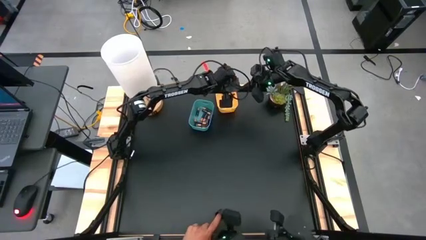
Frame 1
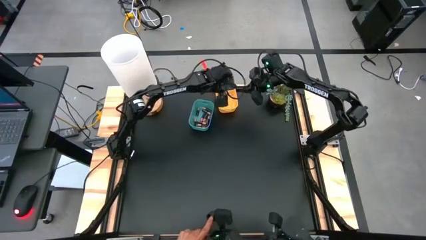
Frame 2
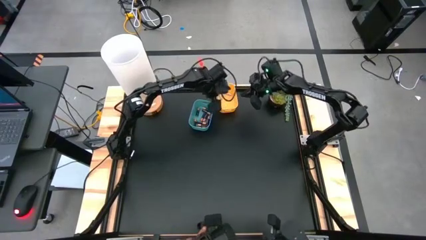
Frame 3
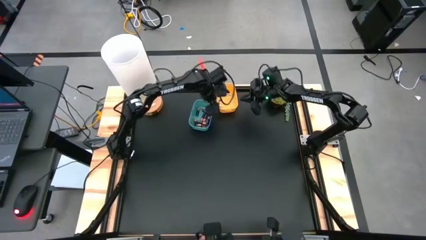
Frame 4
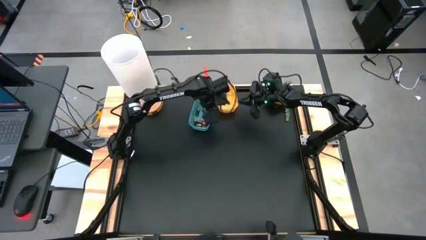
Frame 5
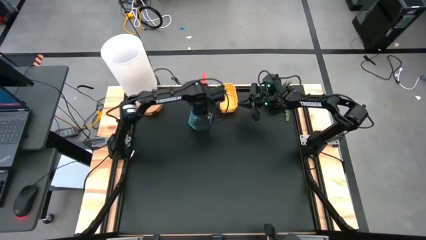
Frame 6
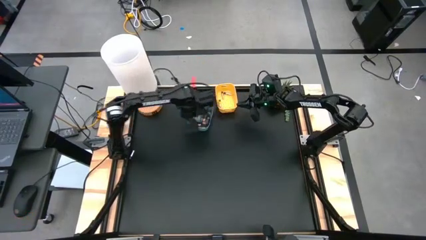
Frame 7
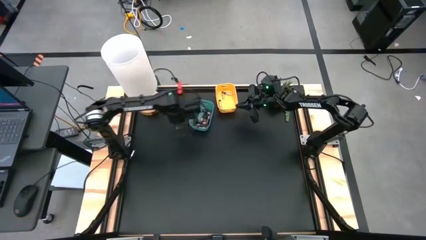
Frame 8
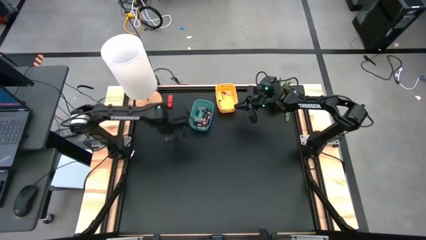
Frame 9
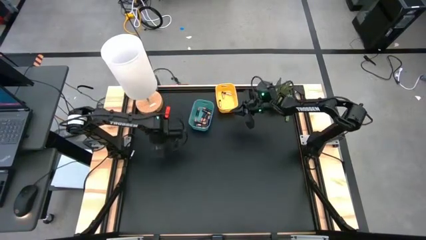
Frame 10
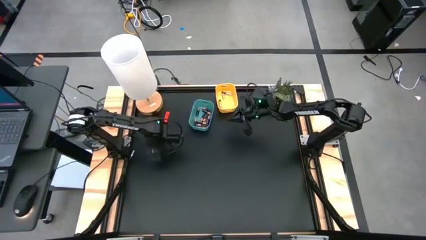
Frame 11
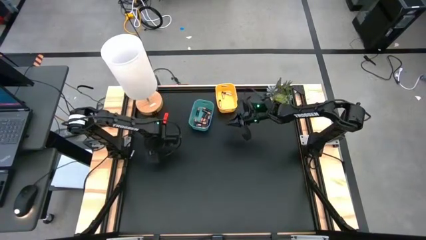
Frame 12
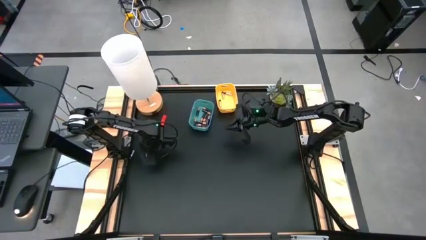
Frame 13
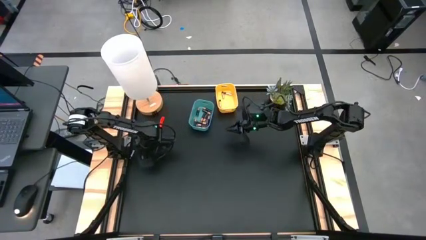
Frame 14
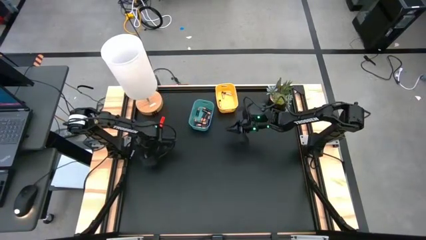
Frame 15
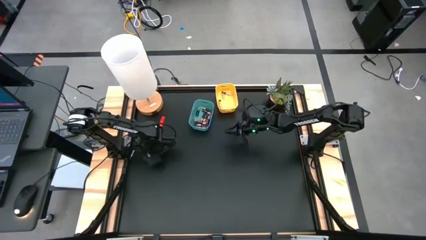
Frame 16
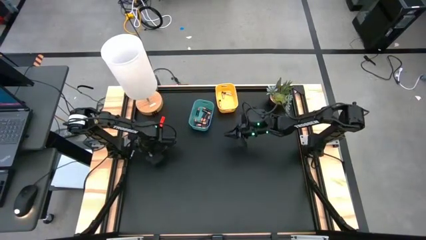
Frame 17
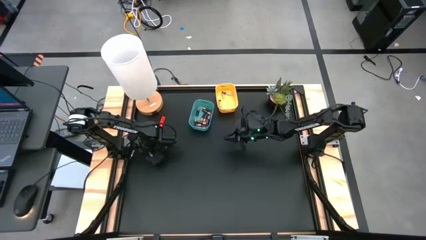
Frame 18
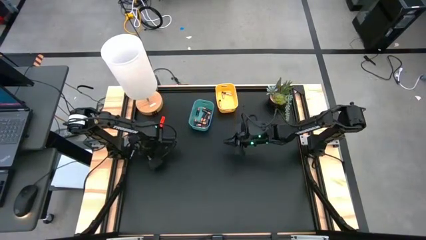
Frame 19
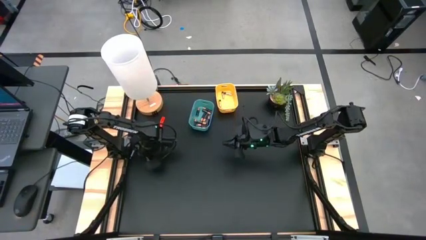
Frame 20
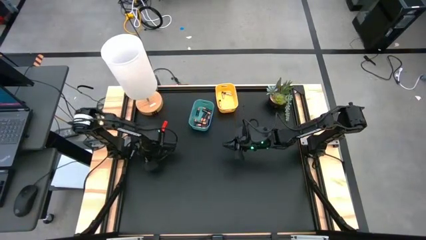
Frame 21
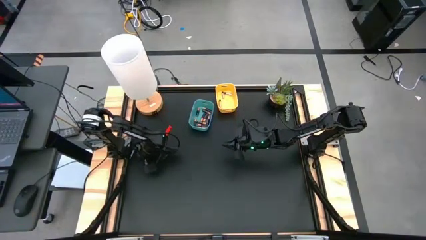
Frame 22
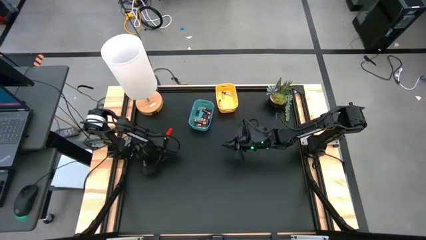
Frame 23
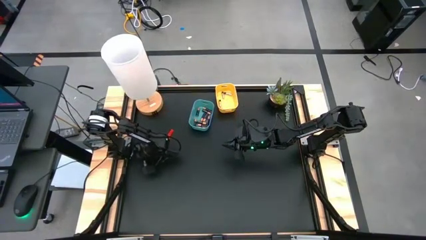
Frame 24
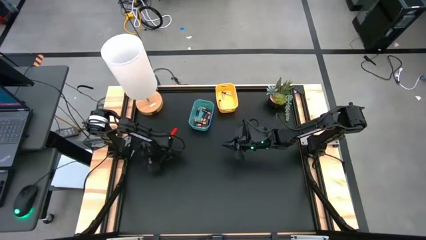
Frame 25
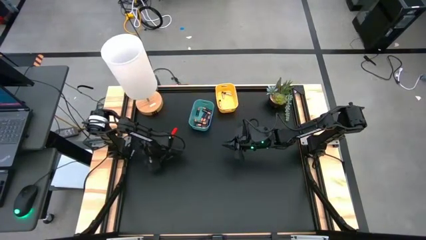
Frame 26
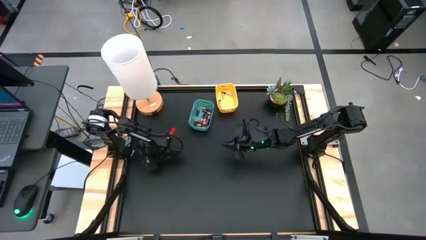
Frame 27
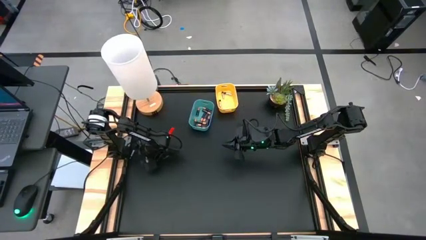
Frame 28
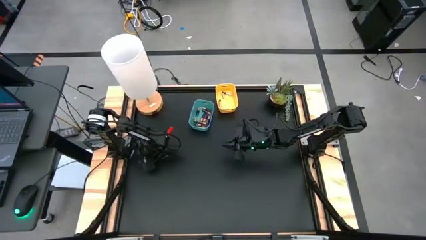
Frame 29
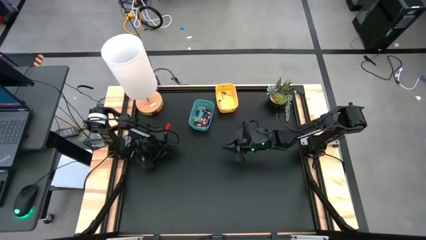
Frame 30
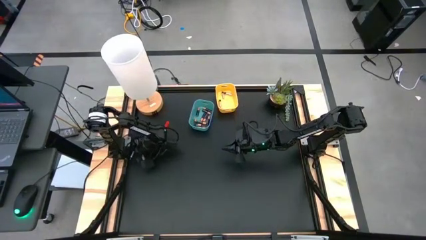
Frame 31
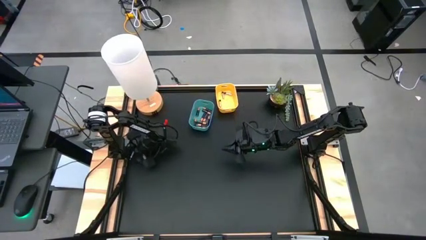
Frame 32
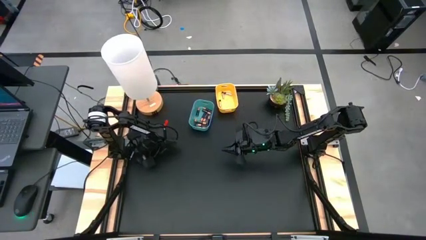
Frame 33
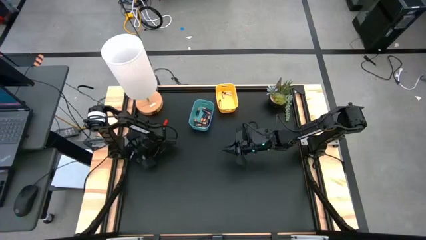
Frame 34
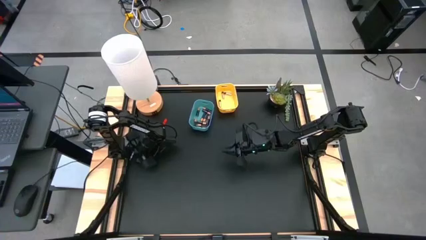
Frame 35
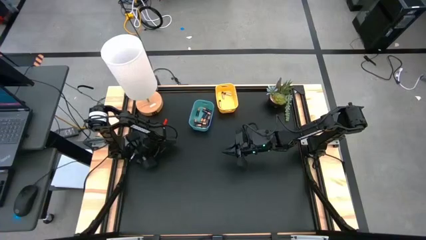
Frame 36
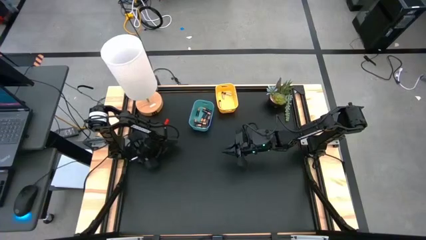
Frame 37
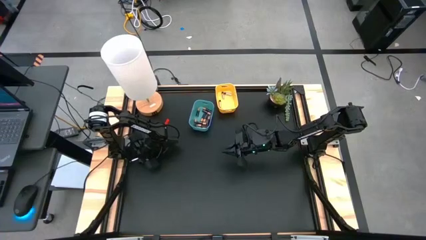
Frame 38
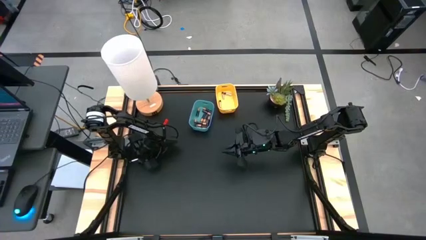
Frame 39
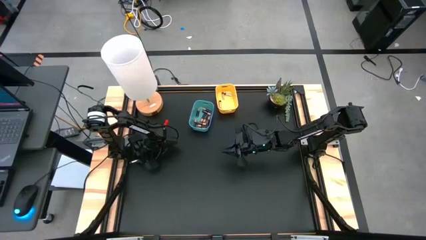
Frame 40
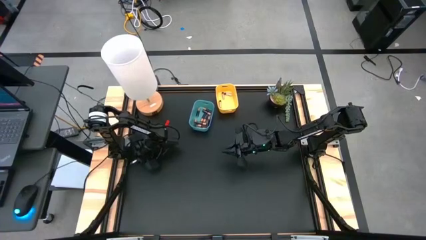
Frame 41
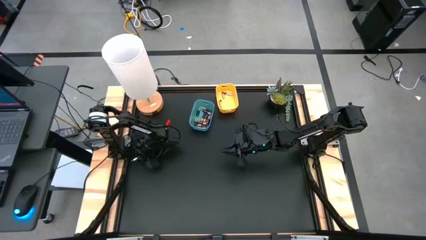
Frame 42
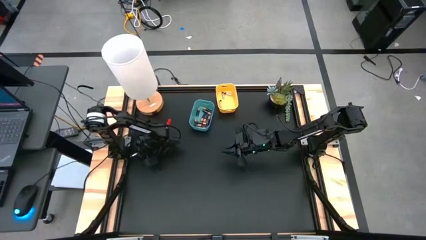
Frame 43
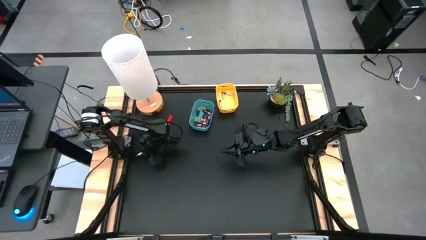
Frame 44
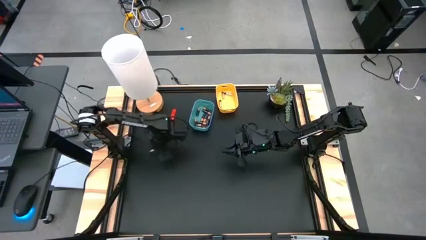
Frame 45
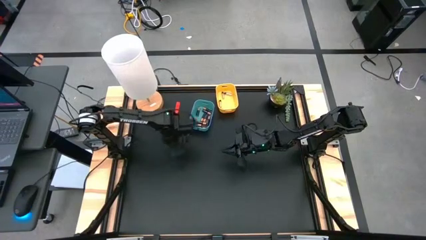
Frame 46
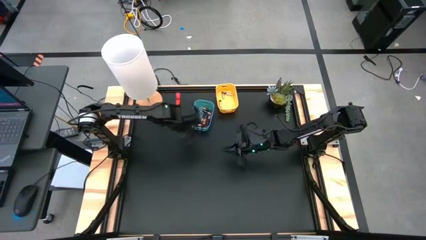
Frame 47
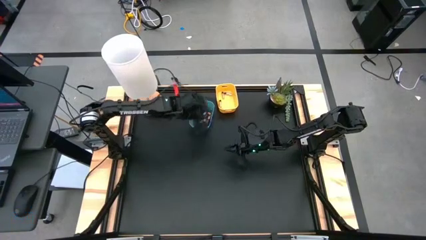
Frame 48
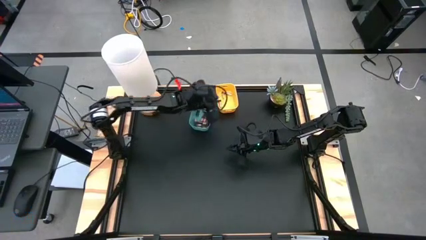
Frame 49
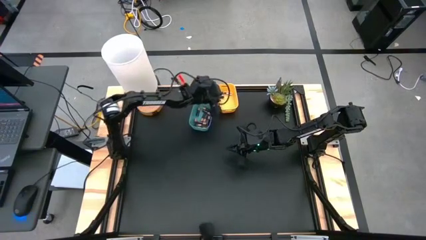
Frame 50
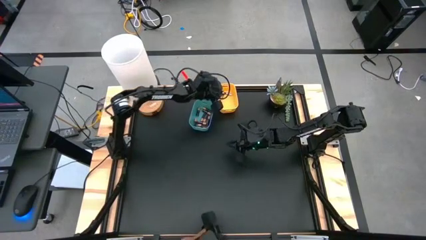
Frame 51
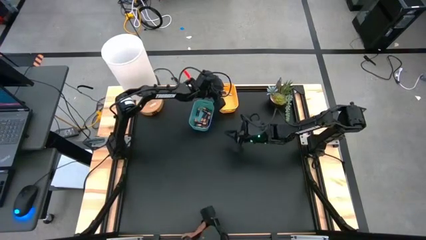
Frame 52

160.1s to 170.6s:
Task: Sort batteries
Put the silver black battery into the yellow bin

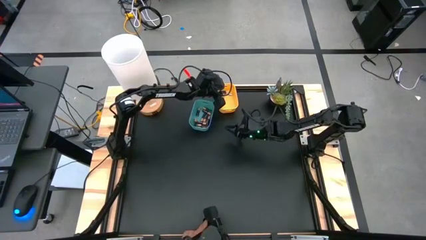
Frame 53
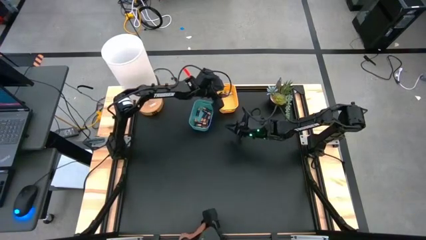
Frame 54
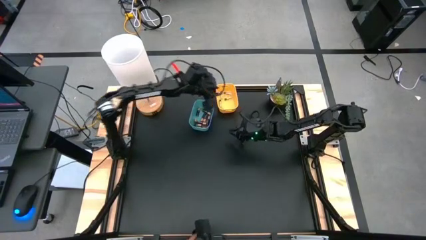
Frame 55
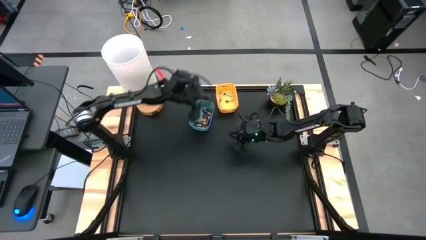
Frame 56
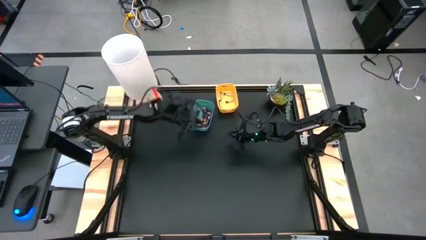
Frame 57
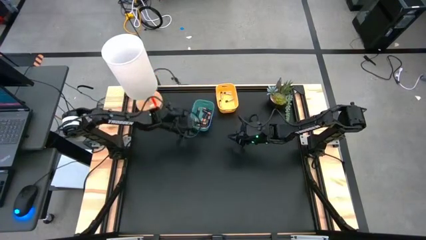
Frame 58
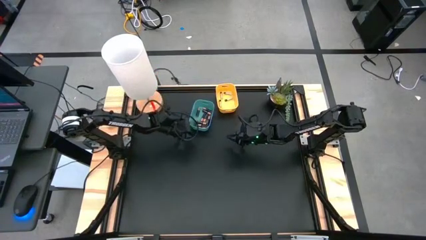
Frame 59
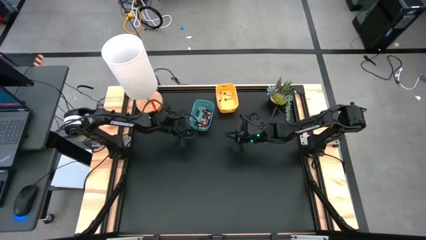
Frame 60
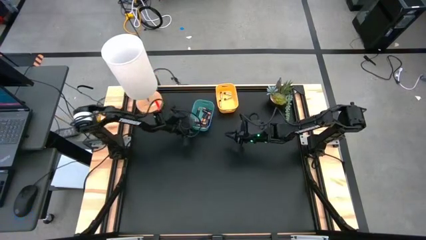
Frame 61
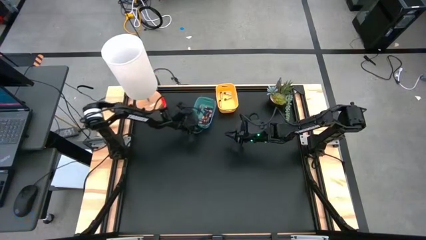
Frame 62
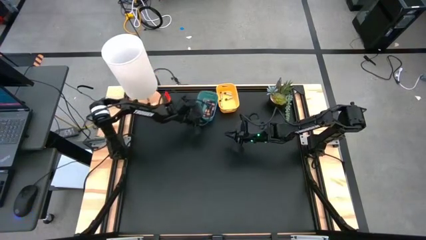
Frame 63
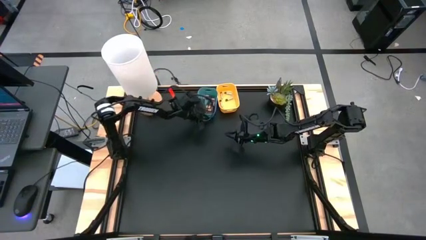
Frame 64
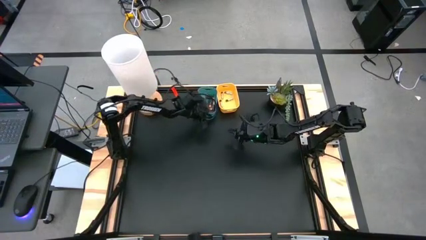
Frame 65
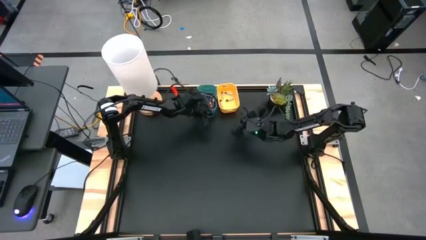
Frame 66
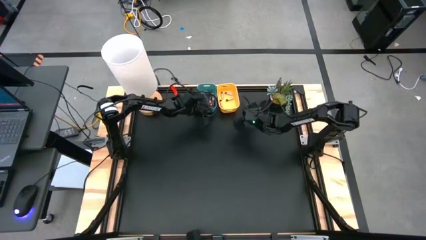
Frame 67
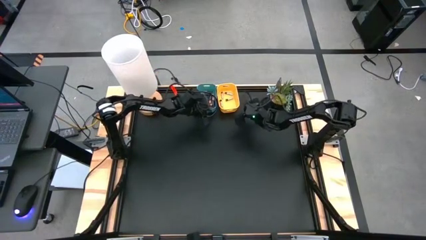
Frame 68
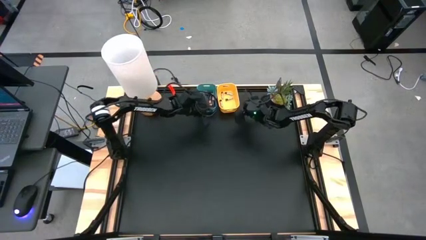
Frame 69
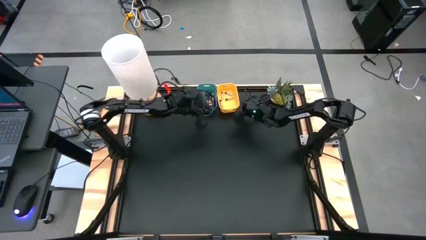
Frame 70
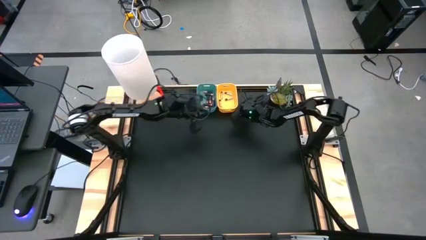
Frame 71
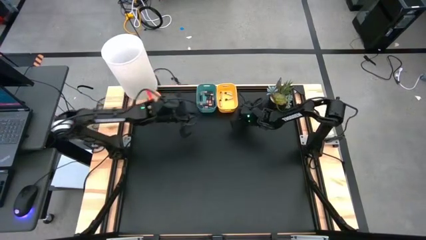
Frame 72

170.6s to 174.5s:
Adjust the bins
